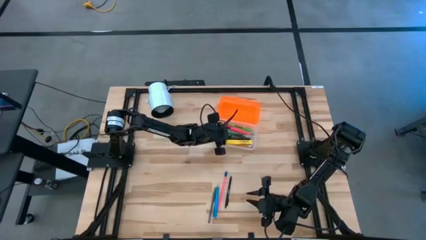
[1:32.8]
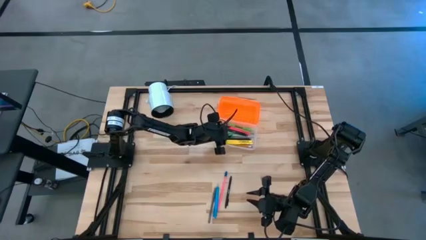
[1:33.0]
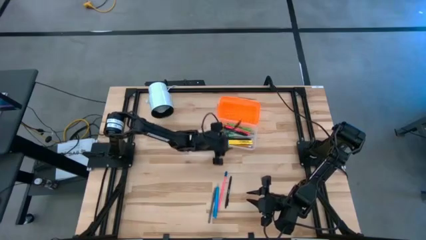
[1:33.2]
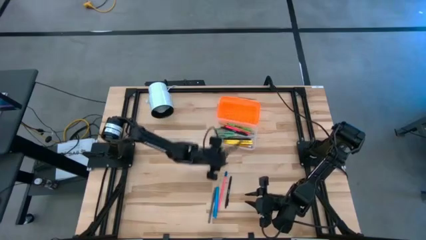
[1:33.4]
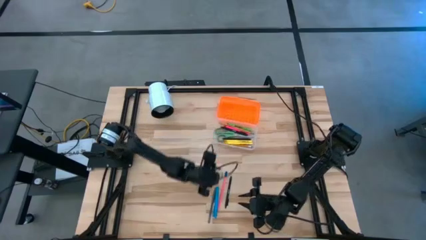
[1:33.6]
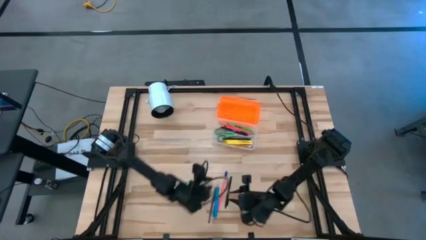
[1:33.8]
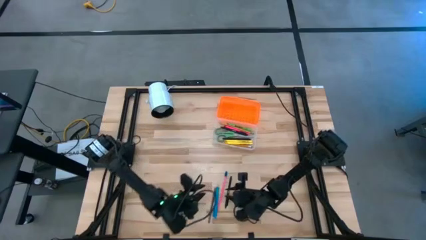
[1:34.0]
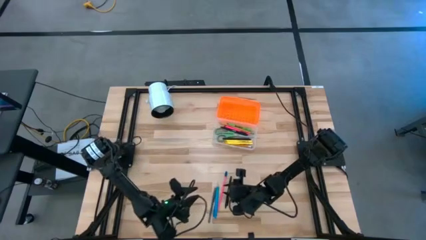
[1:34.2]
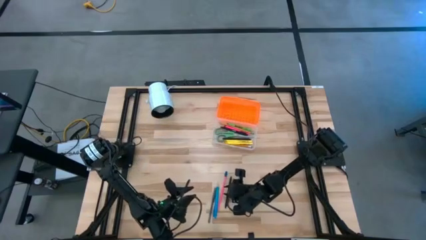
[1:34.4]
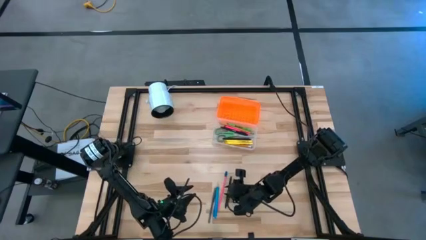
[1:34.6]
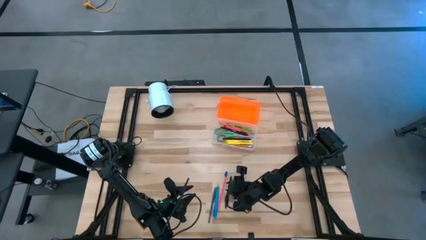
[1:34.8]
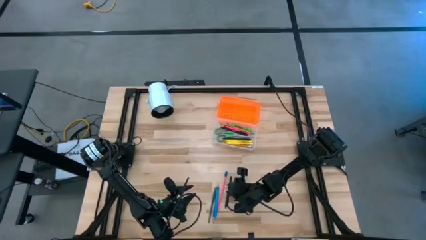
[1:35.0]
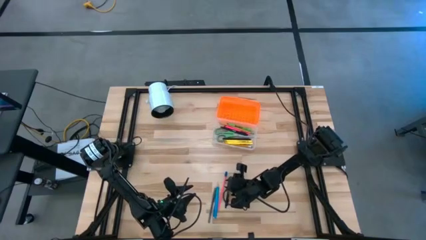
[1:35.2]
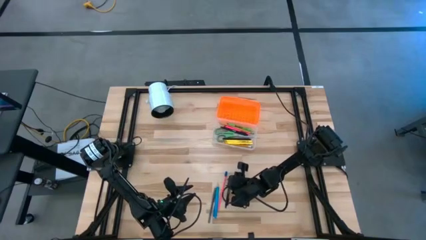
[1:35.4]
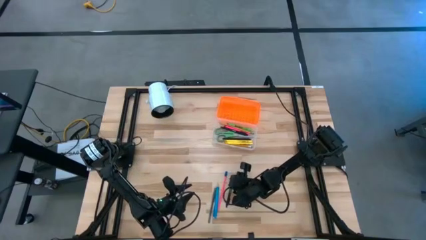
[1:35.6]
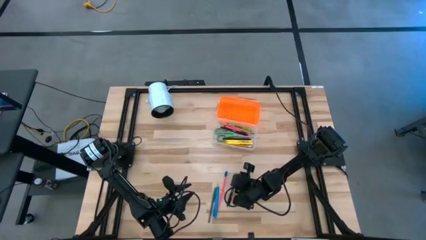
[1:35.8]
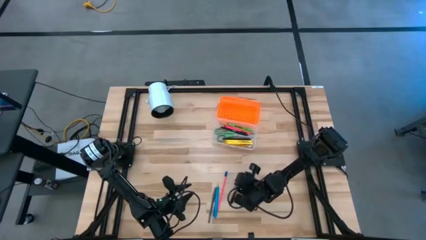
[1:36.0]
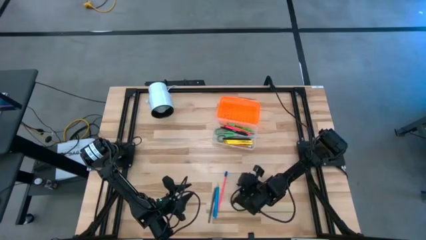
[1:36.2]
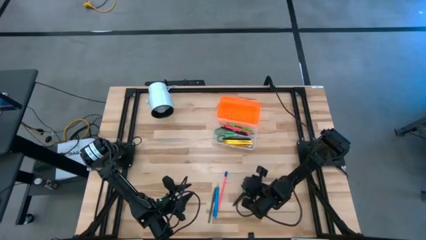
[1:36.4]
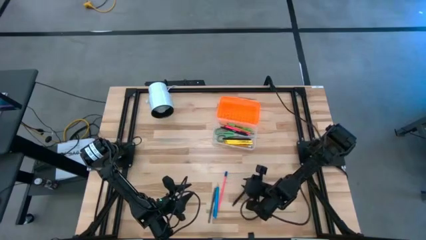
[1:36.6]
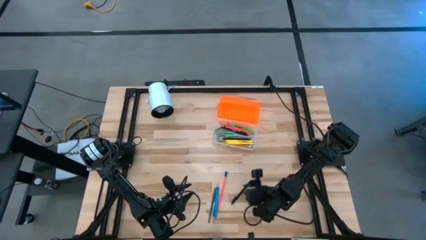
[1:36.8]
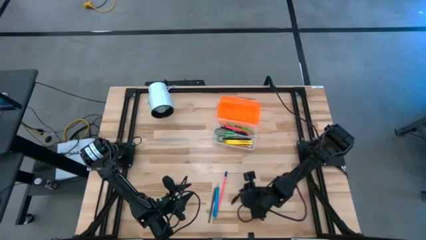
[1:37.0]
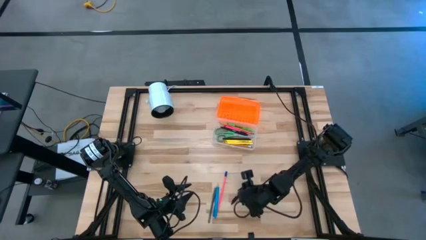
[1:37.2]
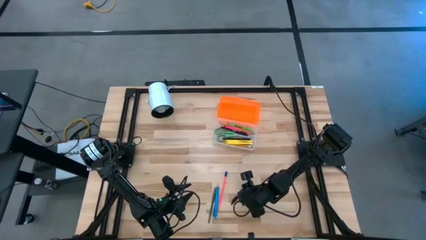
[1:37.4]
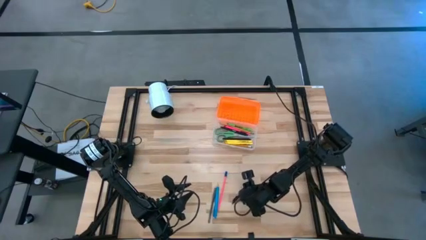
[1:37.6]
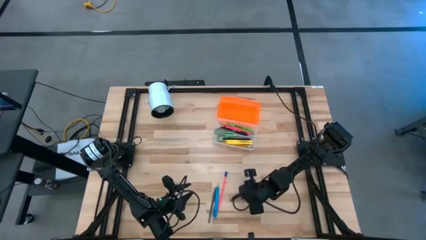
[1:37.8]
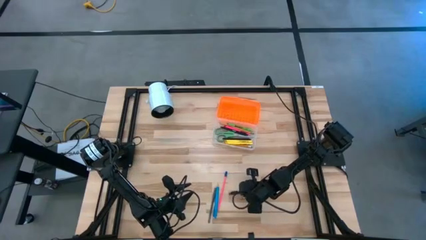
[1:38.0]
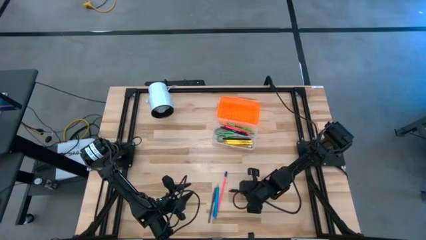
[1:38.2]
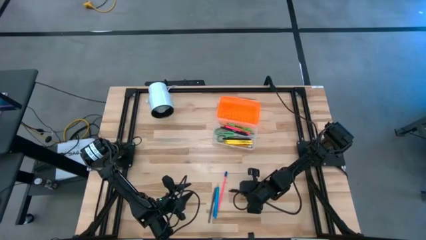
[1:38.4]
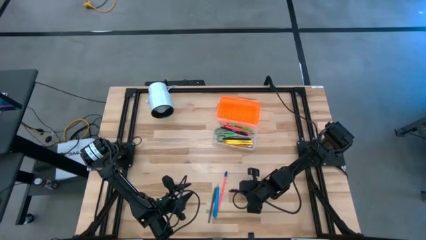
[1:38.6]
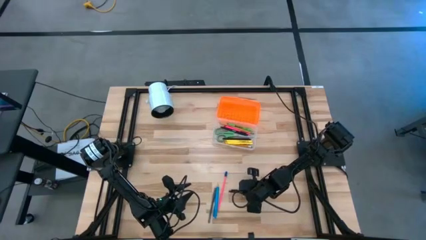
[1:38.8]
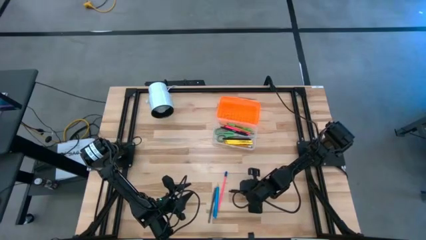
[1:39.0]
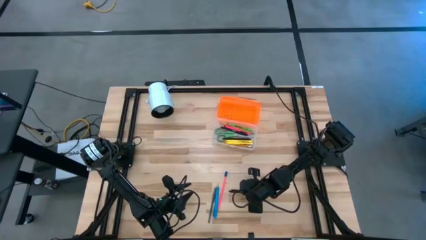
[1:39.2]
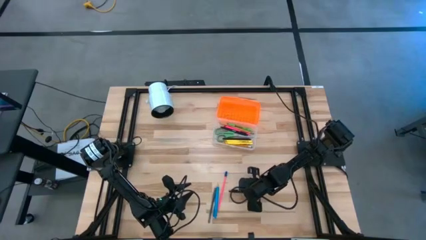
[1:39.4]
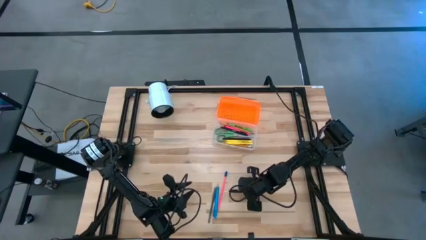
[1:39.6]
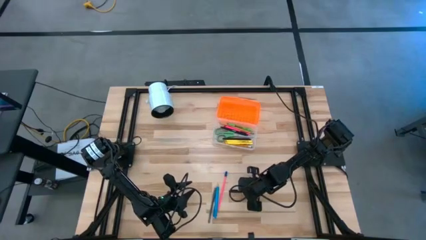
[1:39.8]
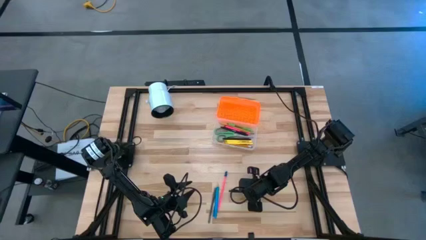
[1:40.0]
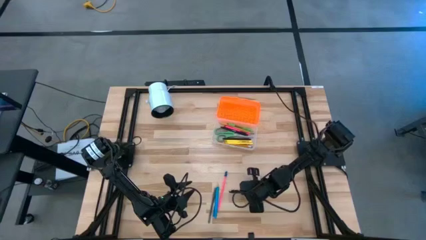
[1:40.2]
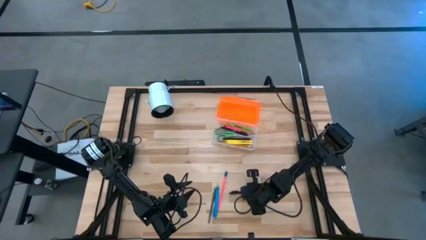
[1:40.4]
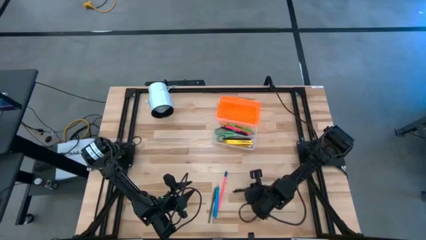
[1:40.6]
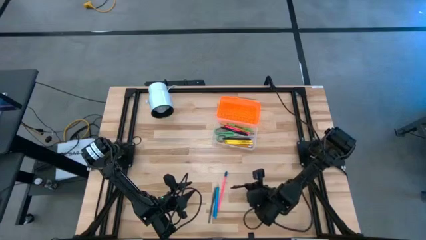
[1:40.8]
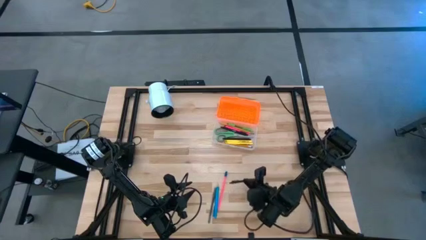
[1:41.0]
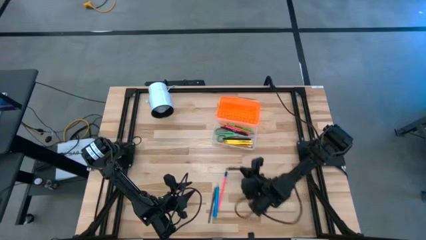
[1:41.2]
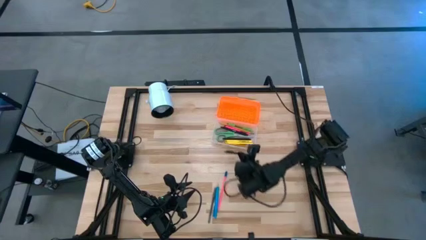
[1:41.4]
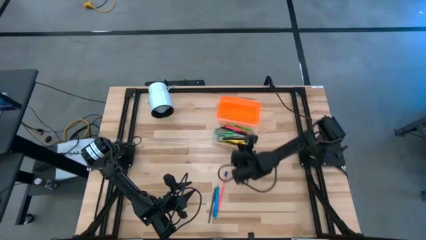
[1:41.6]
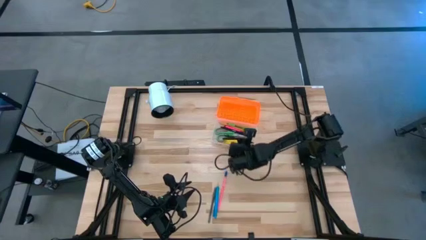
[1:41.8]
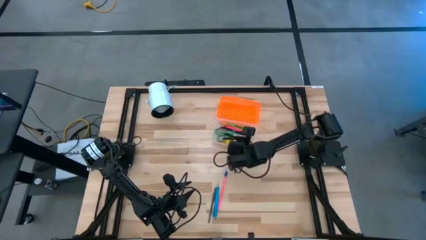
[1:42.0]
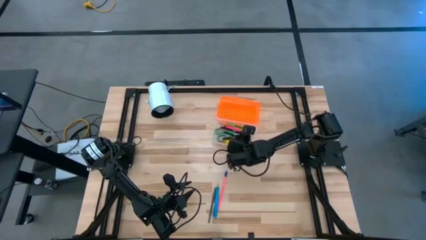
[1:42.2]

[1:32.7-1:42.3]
Task: Pick & place school supplies into a supply box
Put the black pen into the supply box

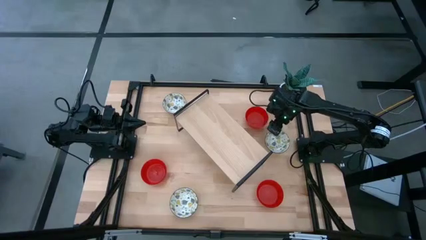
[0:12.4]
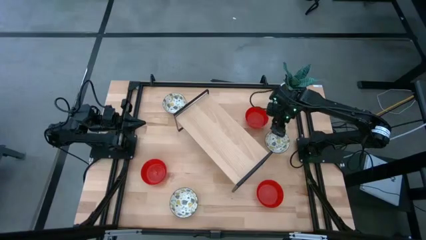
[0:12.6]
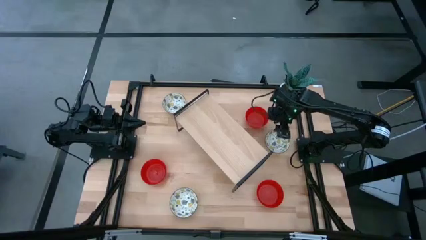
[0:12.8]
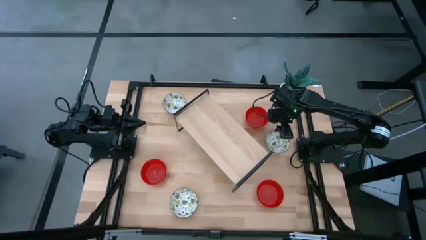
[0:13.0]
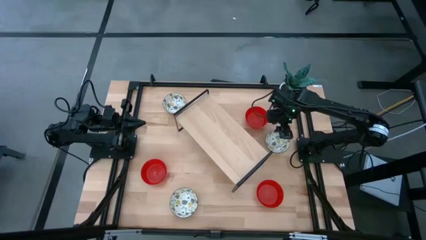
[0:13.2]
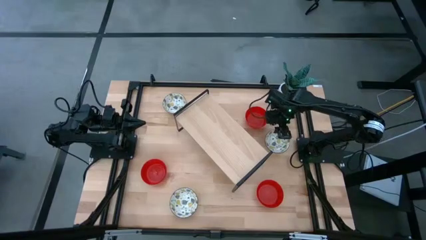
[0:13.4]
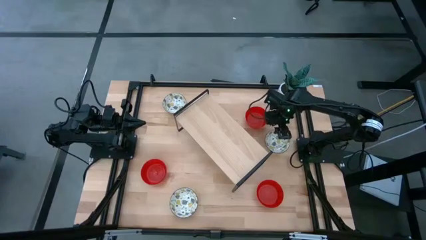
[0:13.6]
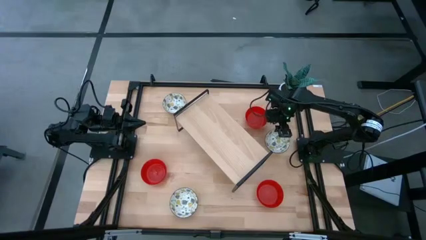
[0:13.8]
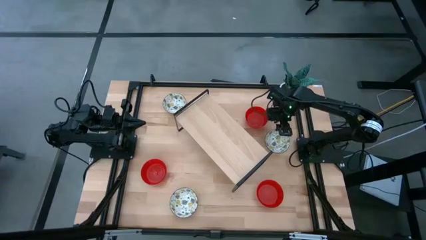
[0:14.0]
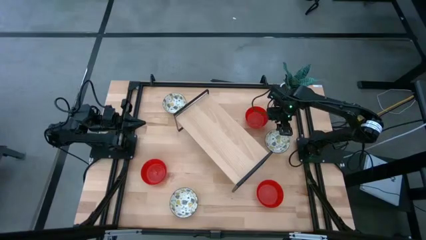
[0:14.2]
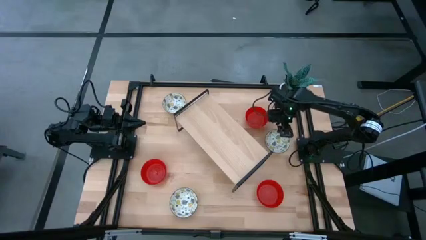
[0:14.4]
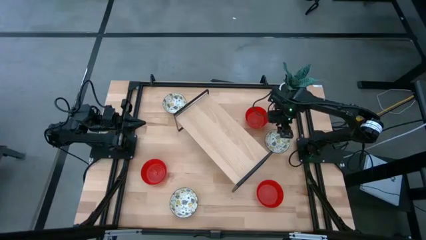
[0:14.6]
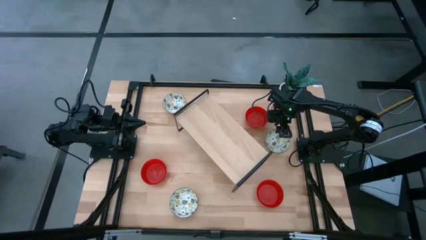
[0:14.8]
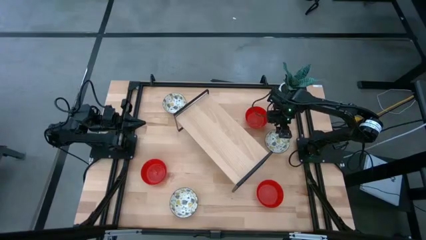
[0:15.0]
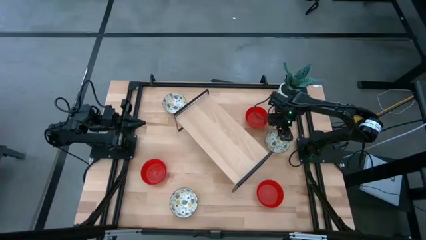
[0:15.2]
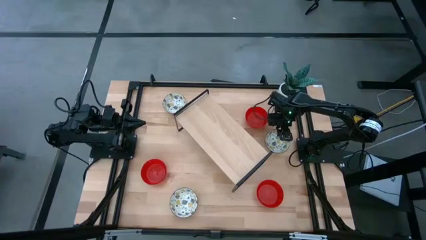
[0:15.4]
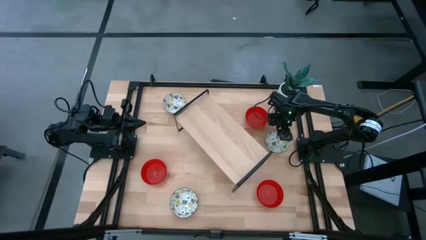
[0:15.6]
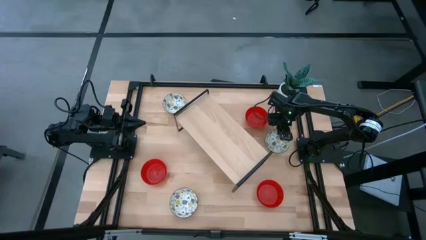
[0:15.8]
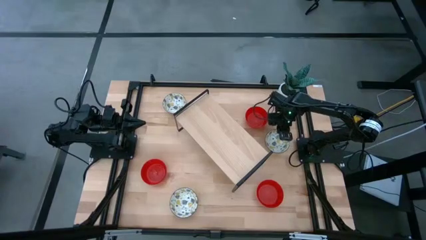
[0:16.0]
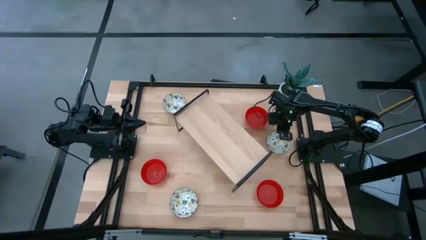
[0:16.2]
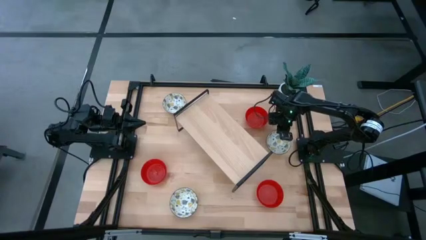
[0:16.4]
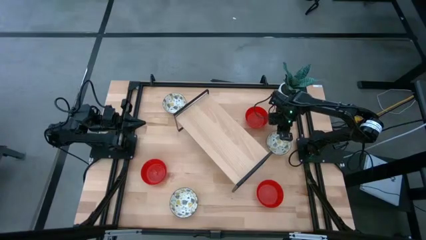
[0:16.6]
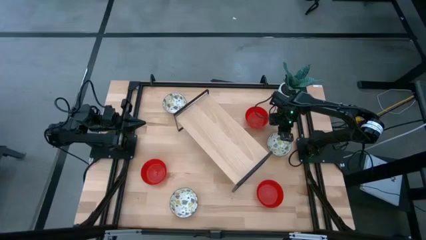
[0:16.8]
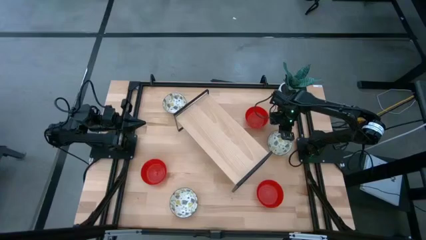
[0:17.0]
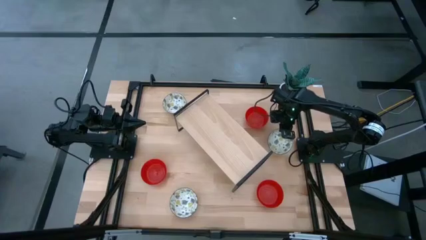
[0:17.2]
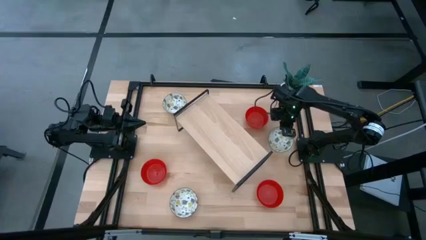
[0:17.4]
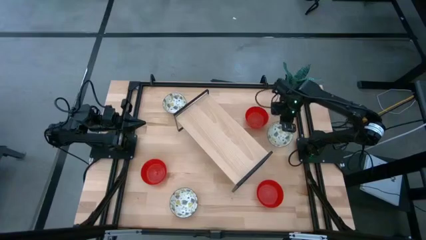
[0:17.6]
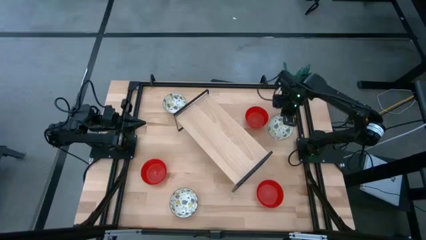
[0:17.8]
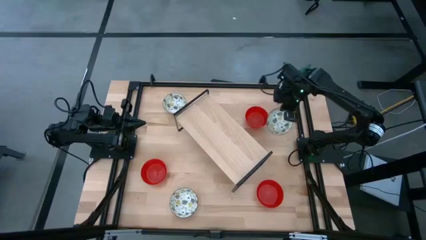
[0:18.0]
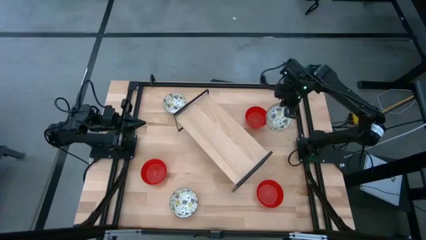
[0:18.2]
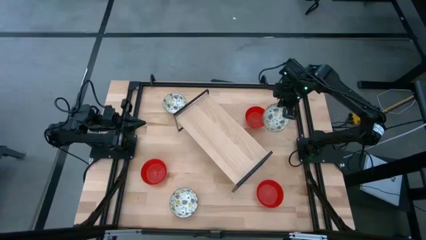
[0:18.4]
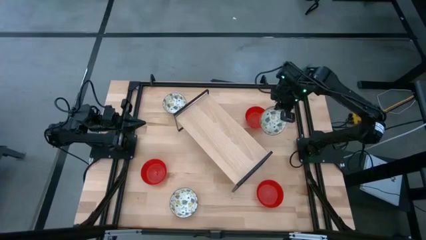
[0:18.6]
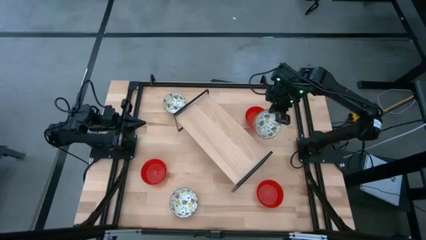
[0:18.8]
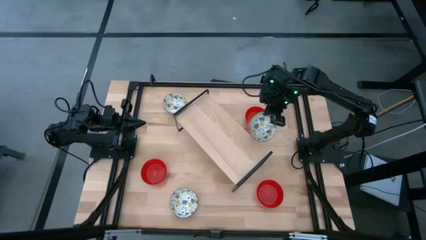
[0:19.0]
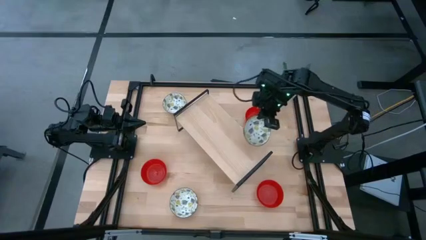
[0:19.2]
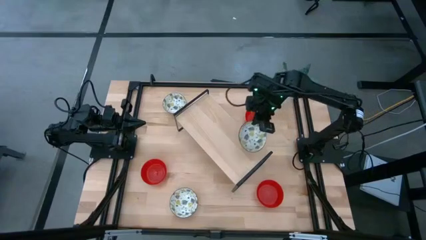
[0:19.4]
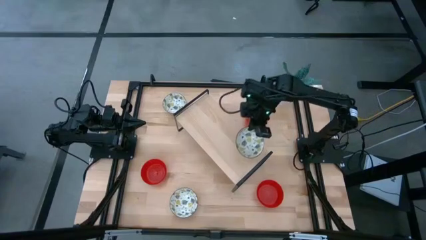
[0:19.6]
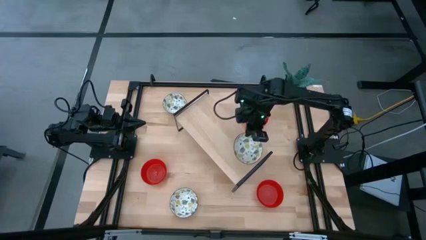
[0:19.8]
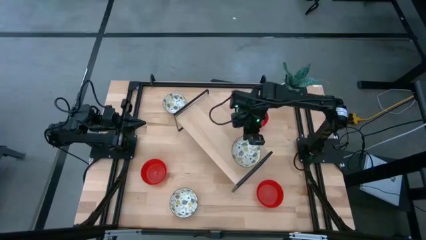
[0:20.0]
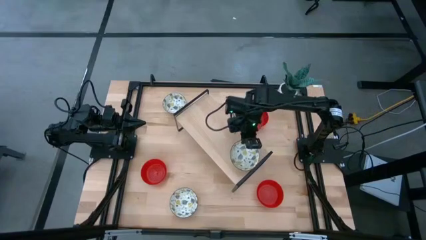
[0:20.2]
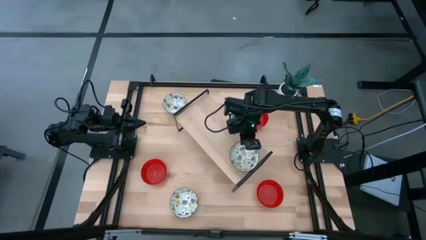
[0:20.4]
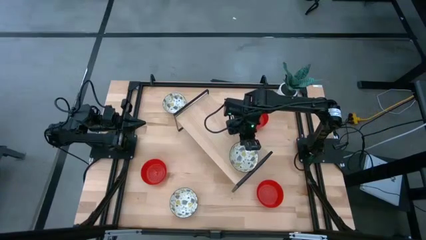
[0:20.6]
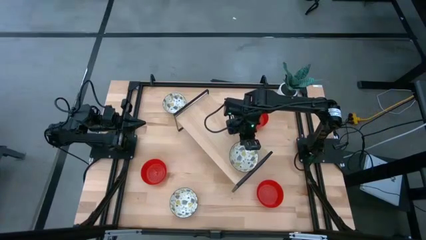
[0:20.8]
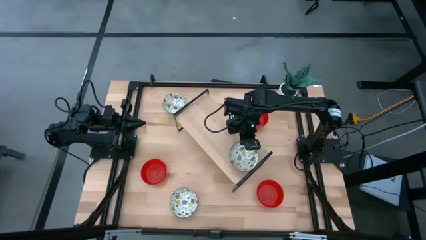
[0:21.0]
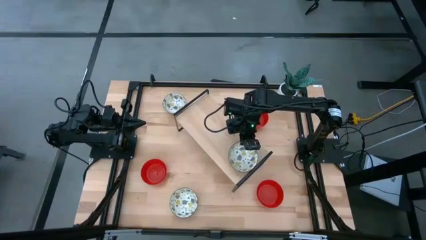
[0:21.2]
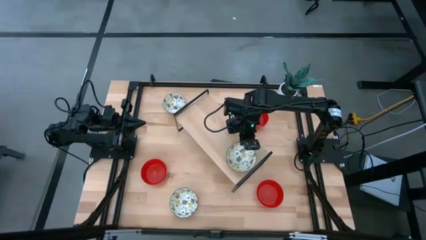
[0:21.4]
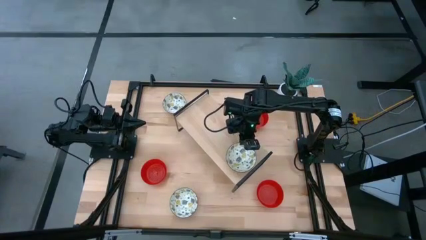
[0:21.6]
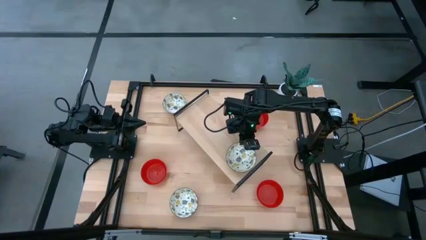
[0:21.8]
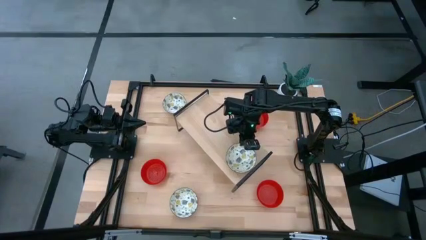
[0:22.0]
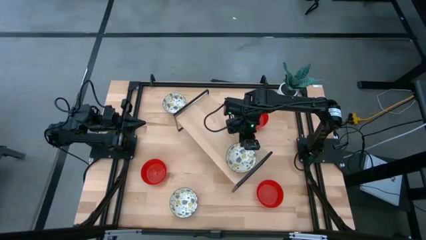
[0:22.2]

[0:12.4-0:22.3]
Task: Pick & Place Mini bowls
Put the middle white patterned bowl on the shelf
